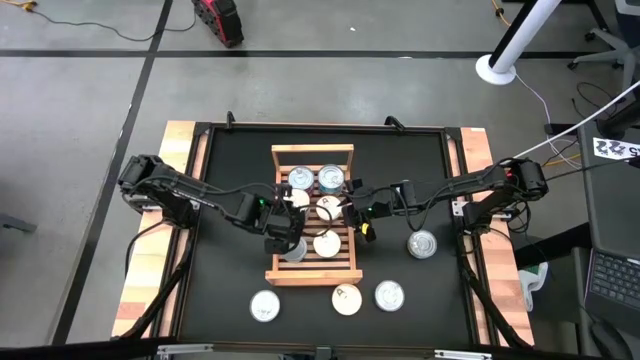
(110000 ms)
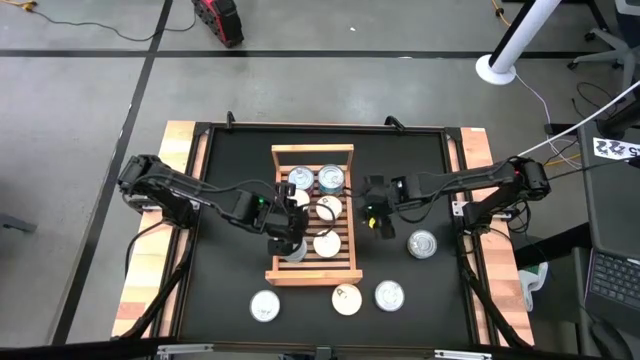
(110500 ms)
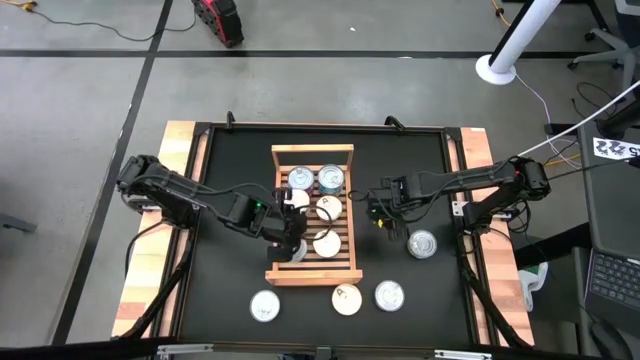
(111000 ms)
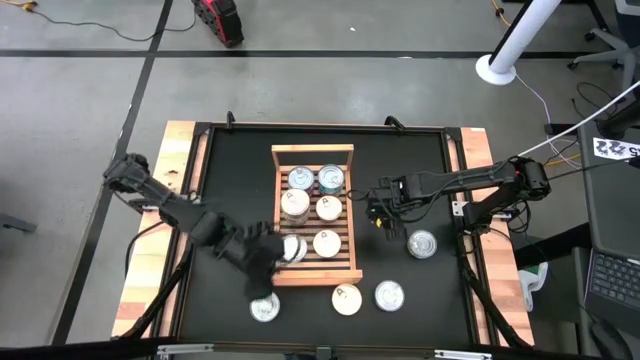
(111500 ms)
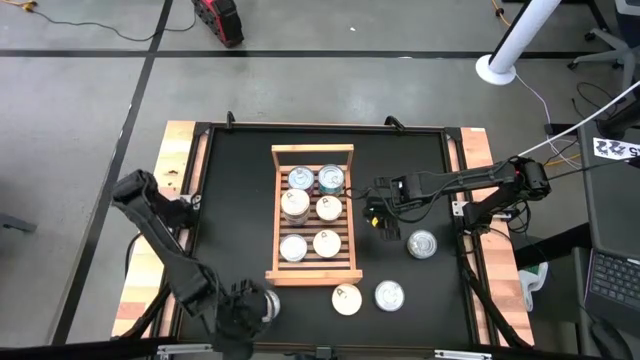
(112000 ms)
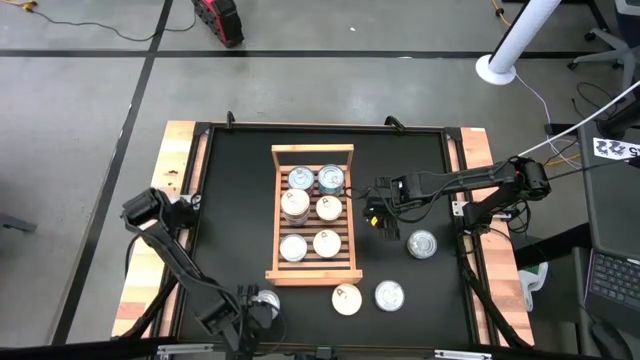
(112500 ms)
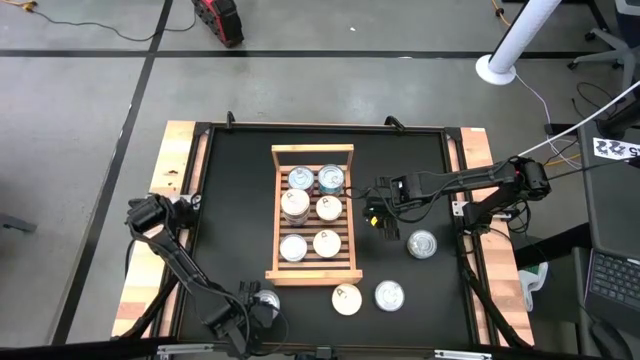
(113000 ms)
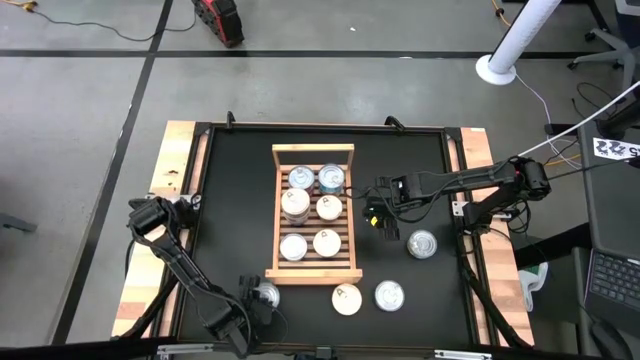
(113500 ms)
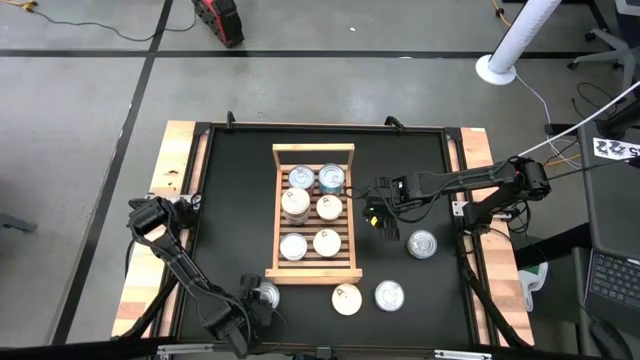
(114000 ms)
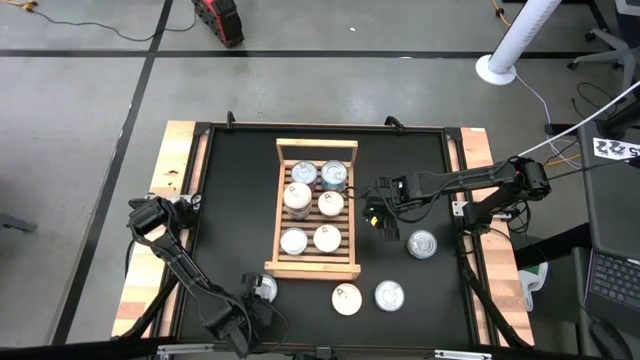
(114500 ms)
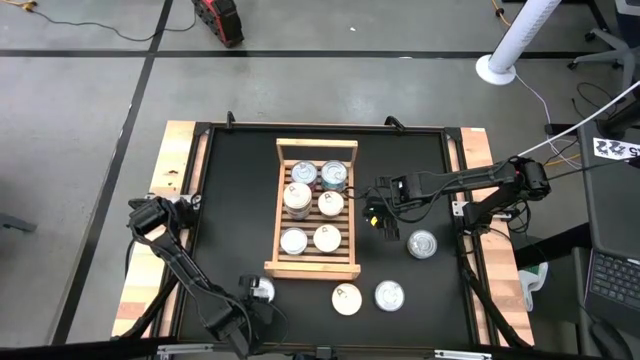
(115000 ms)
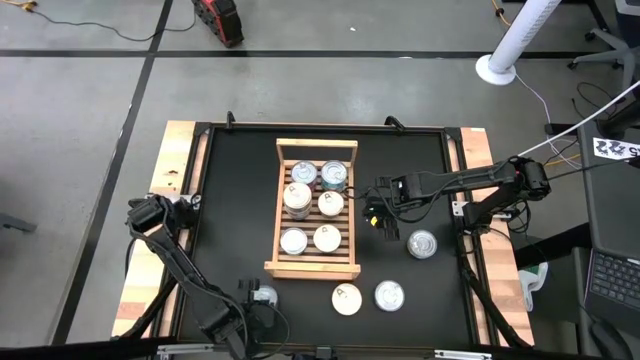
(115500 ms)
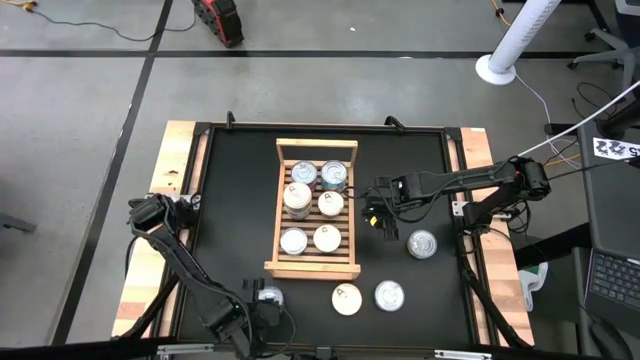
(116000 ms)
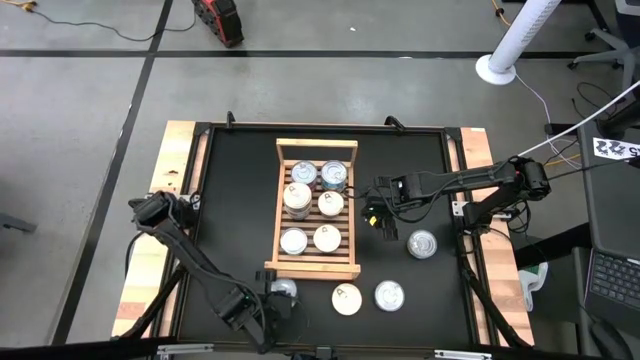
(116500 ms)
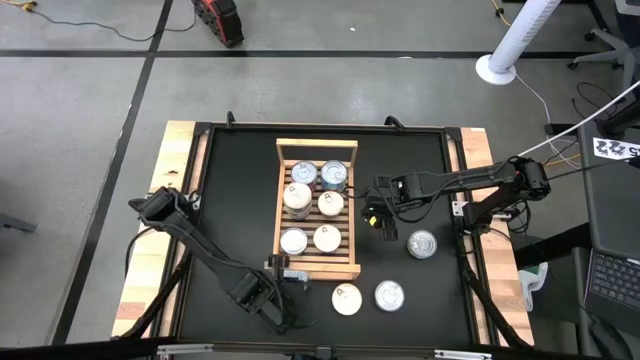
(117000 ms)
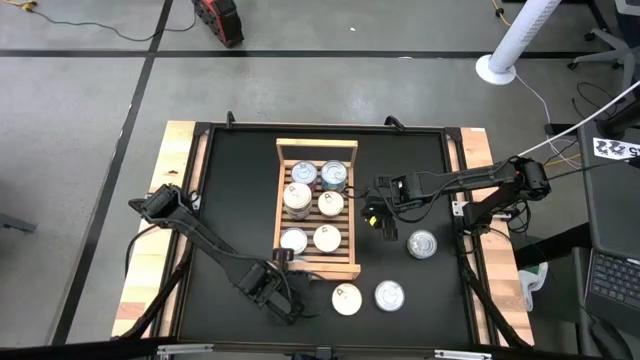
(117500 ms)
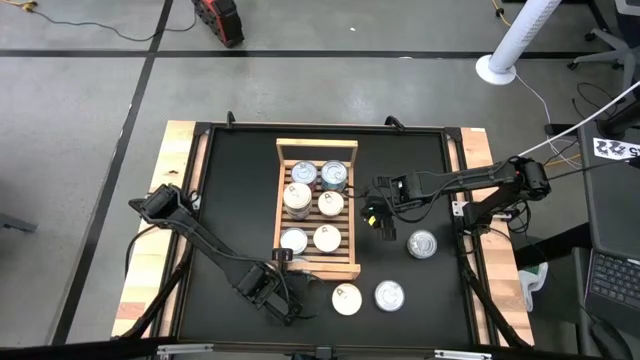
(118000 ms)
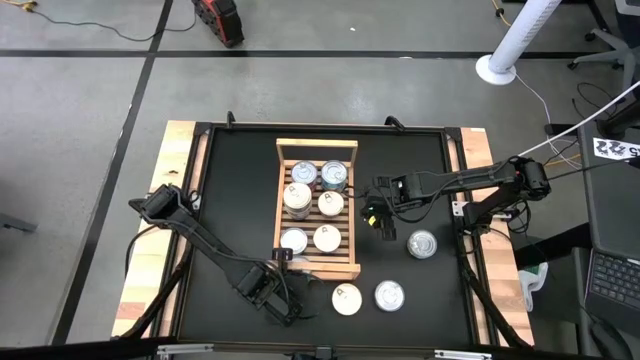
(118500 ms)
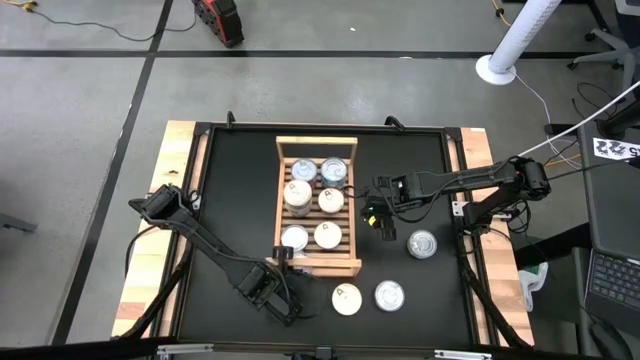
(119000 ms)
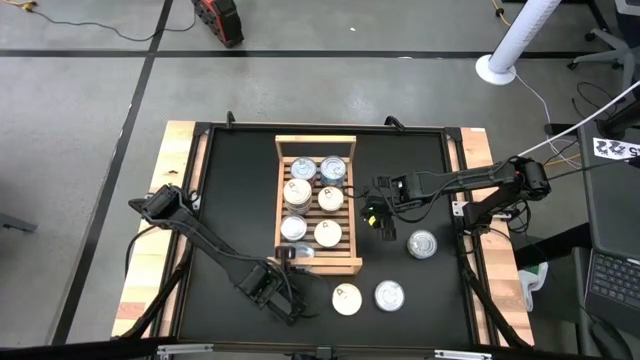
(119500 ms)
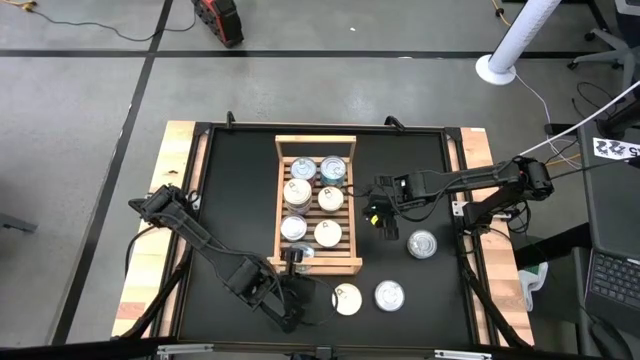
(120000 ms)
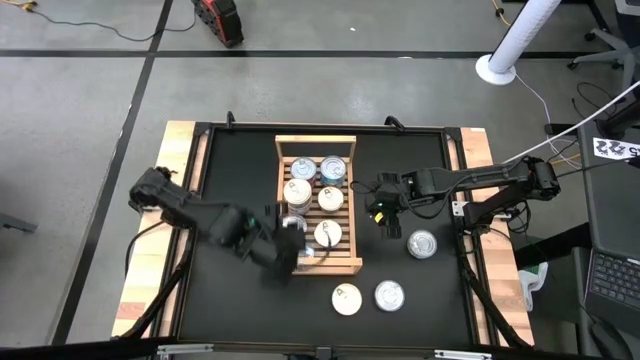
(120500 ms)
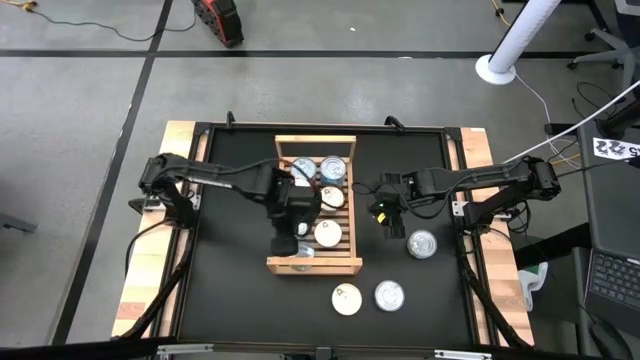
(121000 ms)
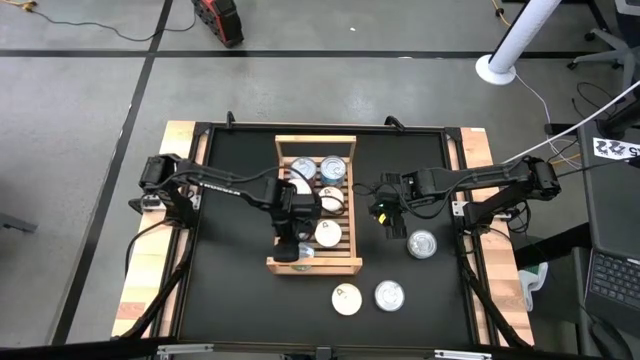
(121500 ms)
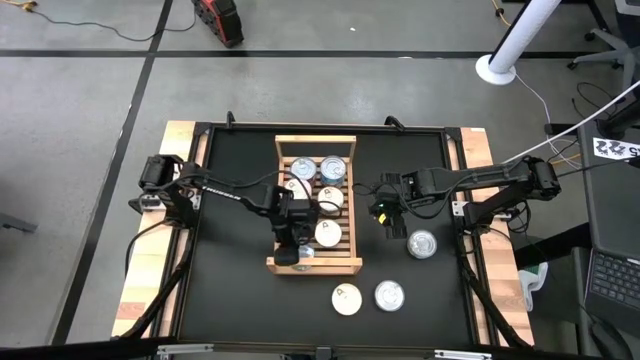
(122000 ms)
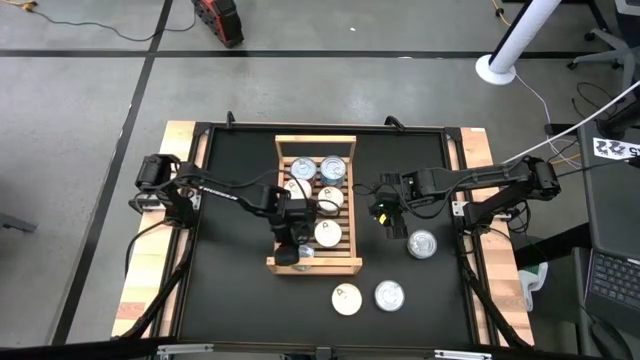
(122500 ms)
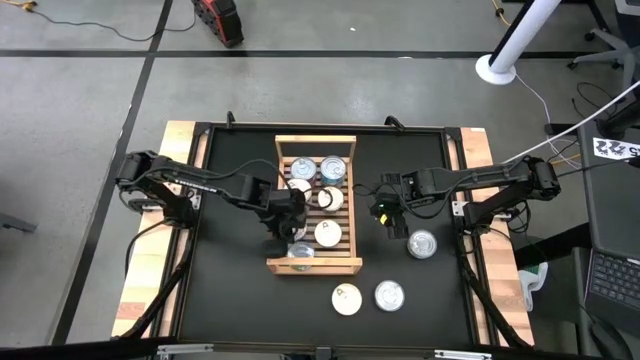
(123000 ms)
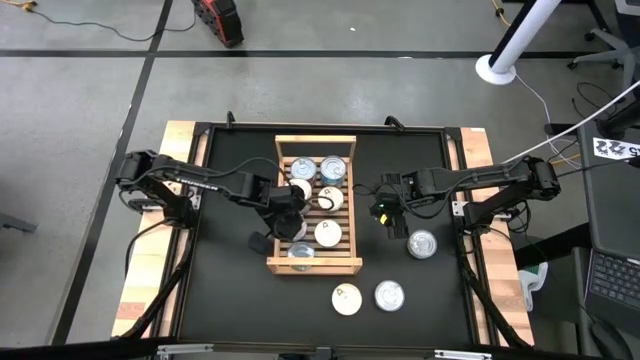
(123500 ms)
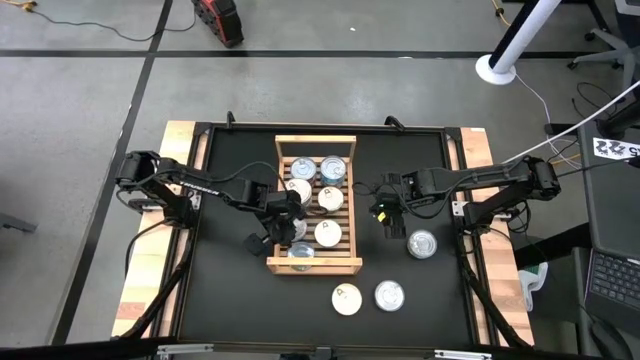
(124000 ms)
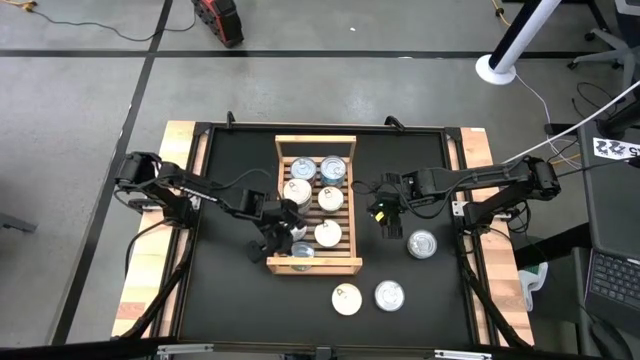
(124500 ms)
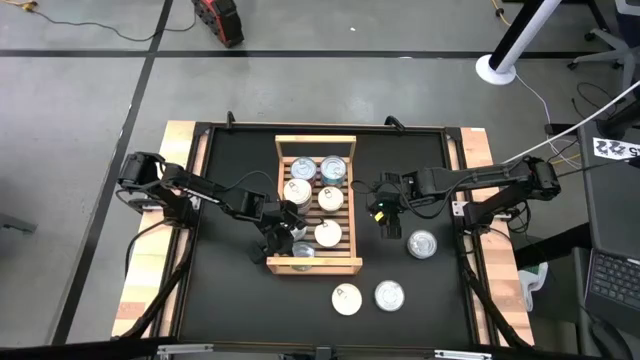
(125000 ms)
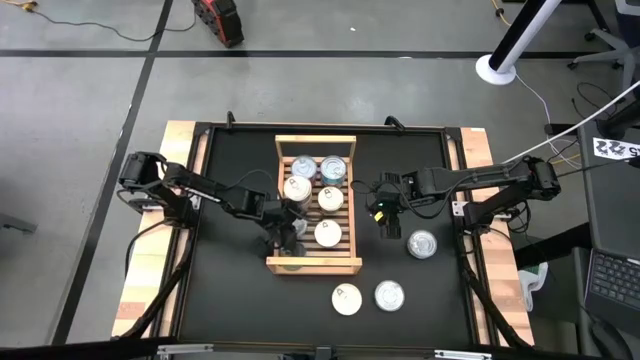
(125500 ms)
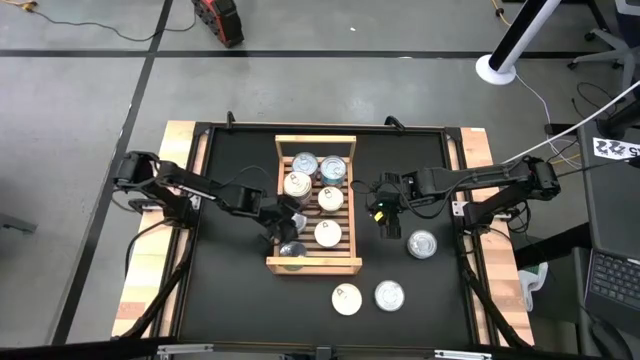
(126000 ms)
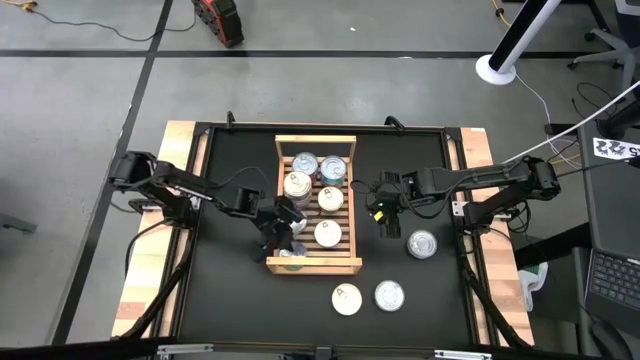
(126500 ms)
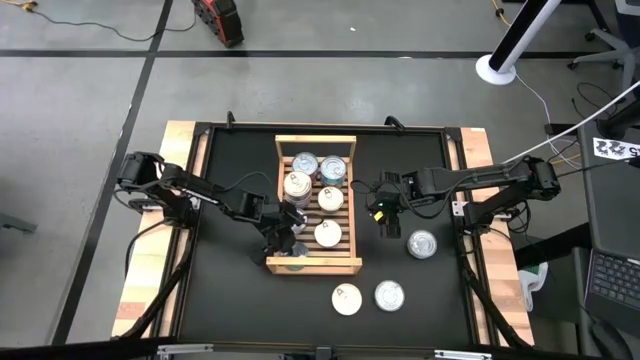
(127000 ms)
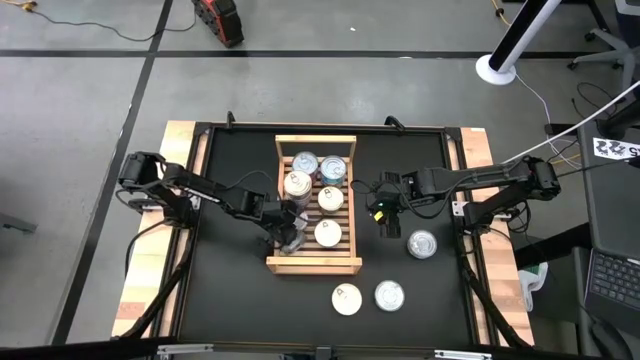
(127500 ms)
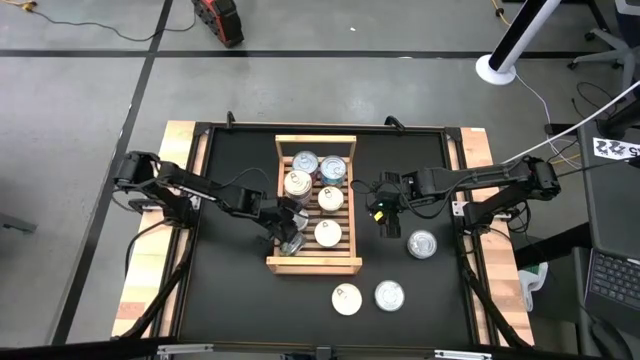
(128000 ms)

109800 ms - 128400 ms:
Task: Stack canned seafood by type on shelf
Put the green tuna can on the shelf

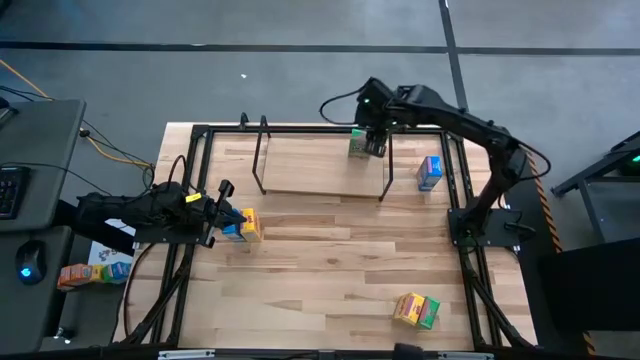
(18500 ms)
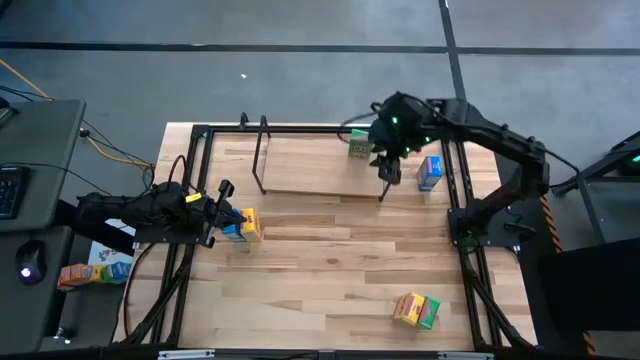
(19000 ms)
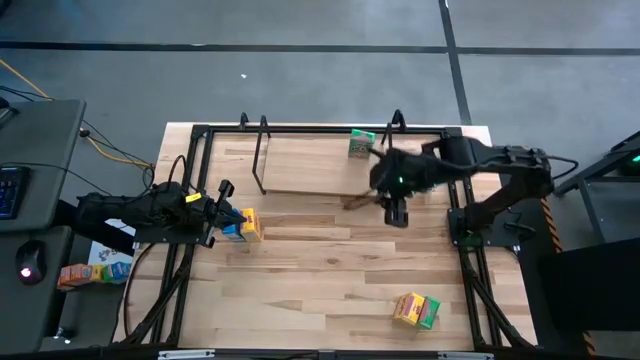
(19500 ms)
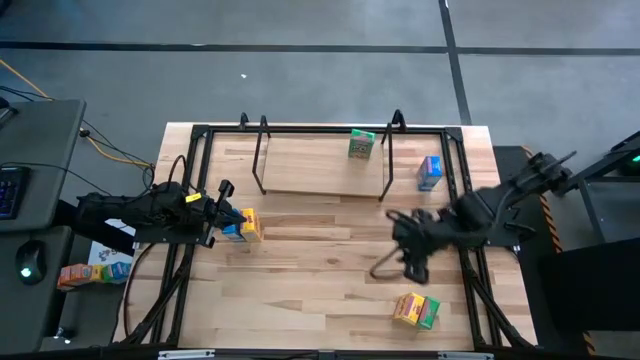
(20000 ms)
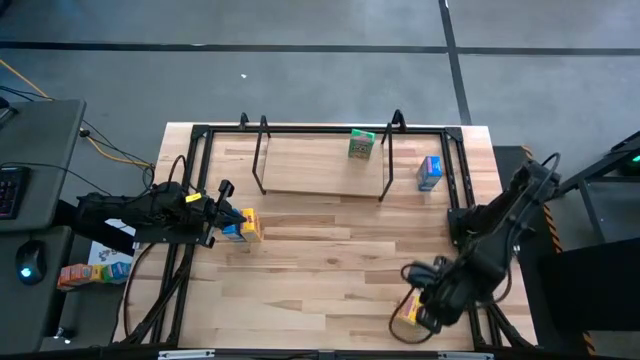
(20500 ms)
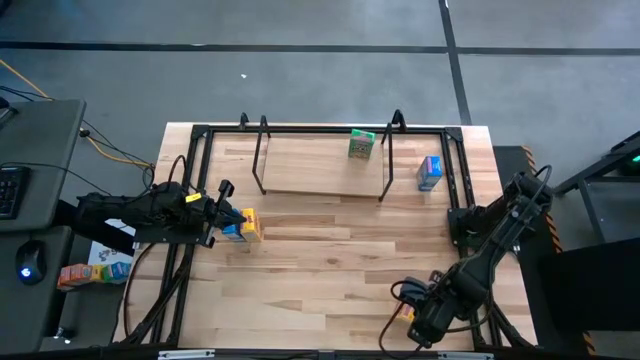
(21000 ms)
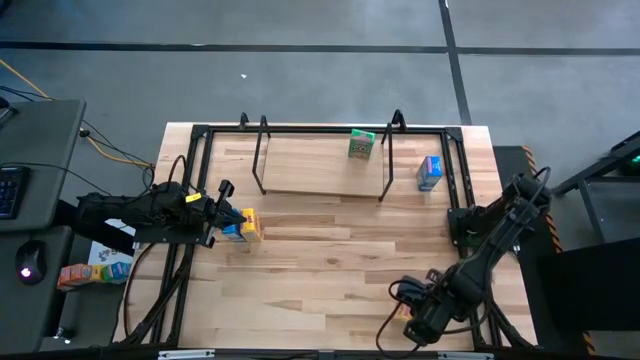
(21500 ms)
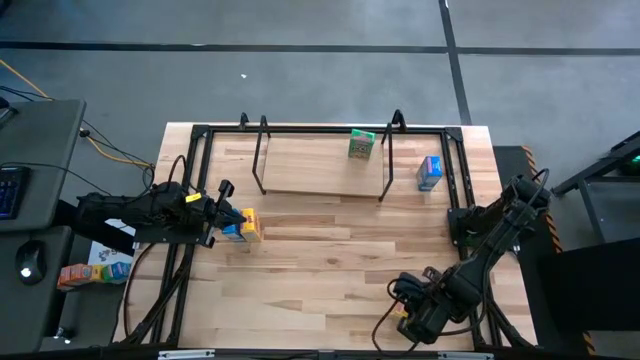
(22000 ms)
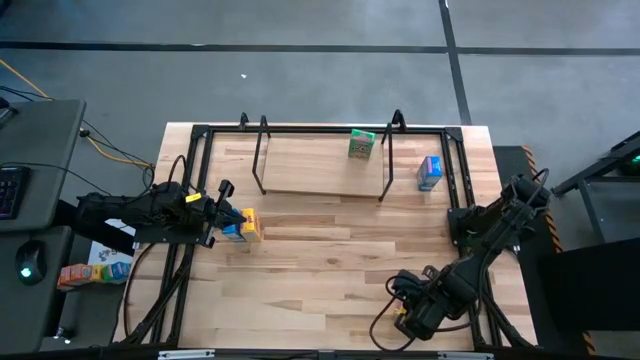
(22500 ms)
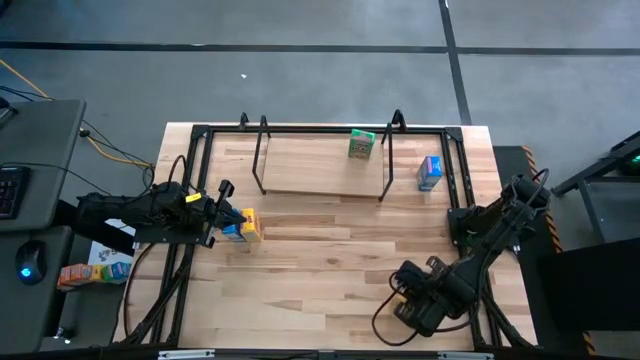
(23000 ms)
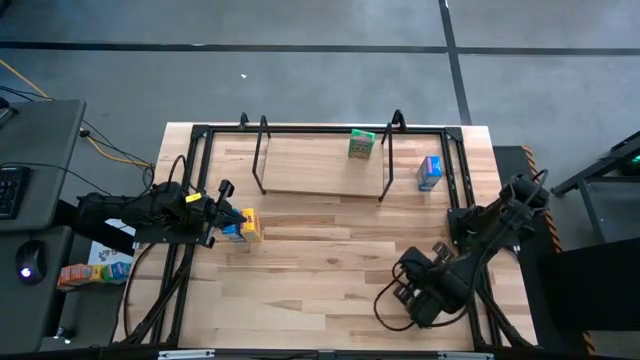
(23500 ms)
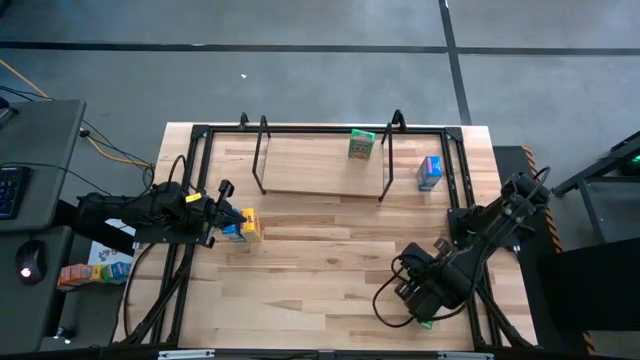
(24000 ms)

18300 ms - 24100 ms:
Task: Stack cereal on shelf
Adjust the yellow cereal box
